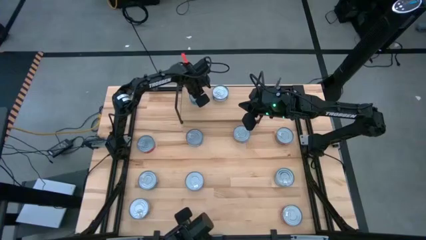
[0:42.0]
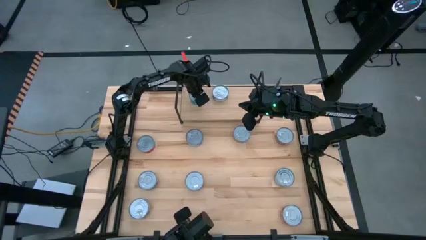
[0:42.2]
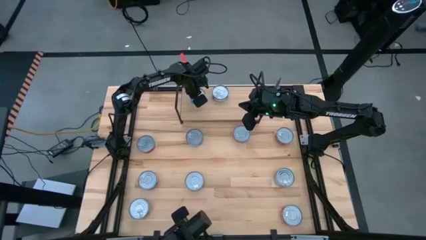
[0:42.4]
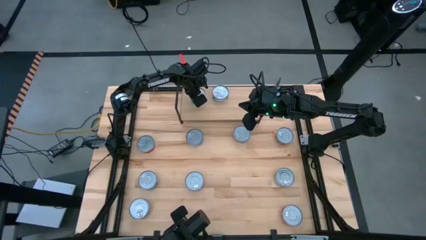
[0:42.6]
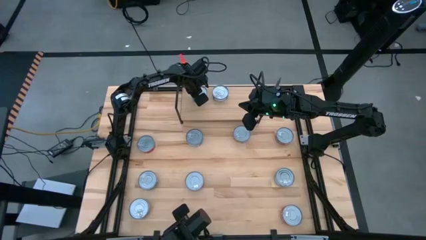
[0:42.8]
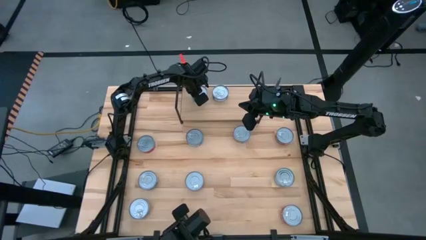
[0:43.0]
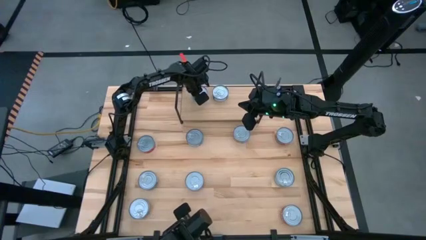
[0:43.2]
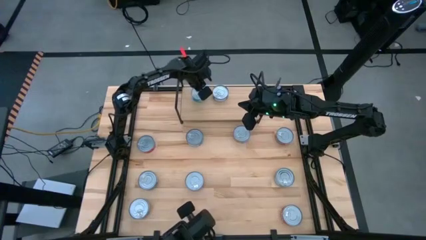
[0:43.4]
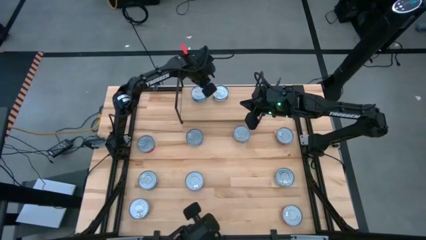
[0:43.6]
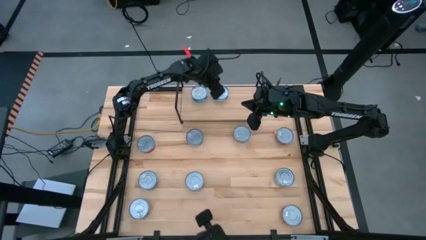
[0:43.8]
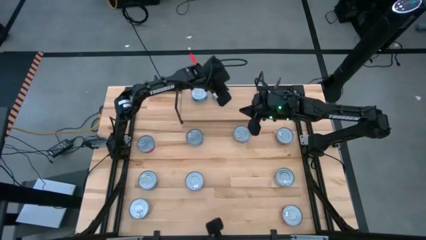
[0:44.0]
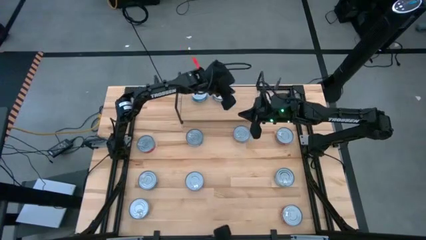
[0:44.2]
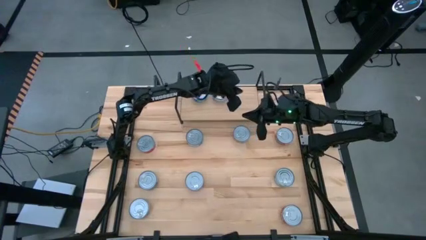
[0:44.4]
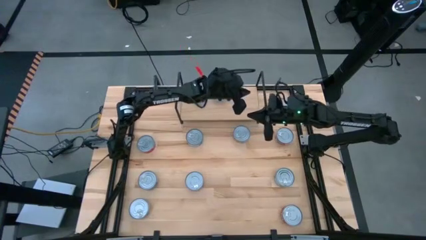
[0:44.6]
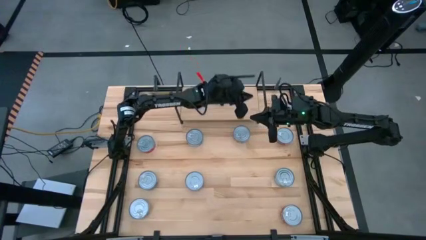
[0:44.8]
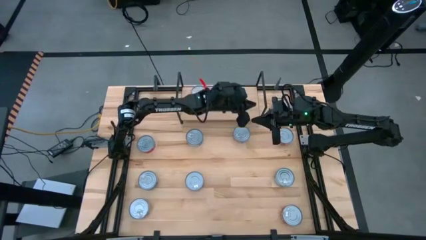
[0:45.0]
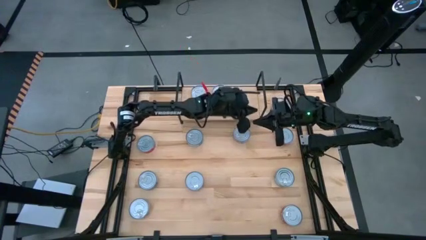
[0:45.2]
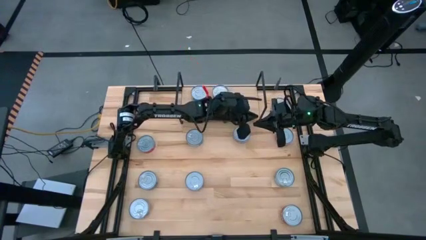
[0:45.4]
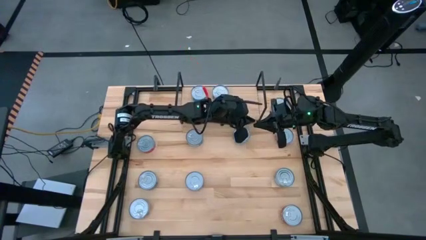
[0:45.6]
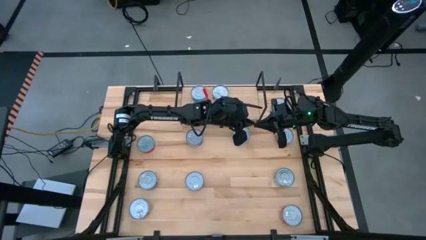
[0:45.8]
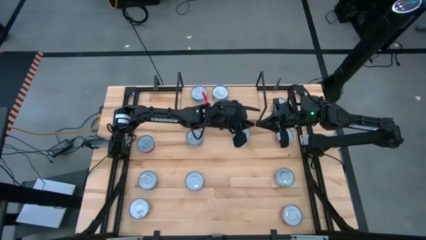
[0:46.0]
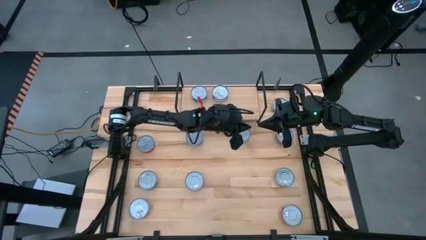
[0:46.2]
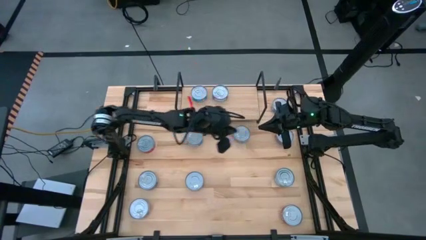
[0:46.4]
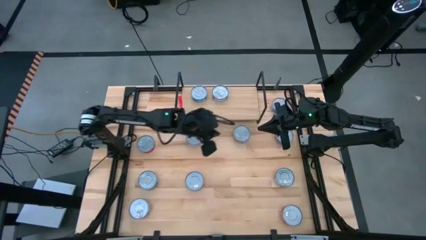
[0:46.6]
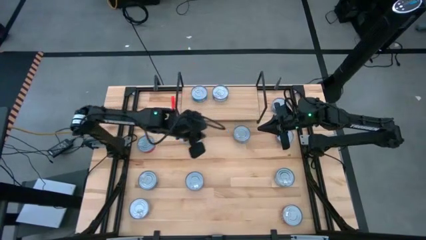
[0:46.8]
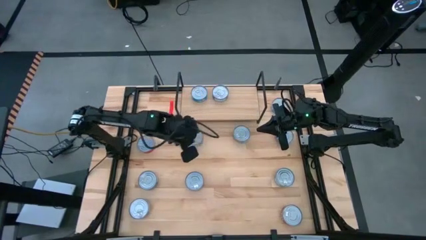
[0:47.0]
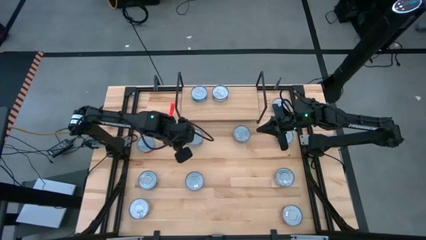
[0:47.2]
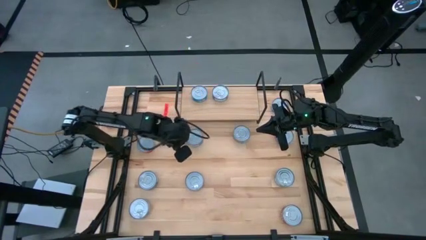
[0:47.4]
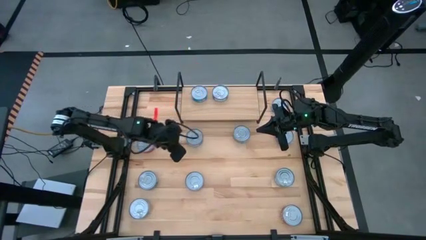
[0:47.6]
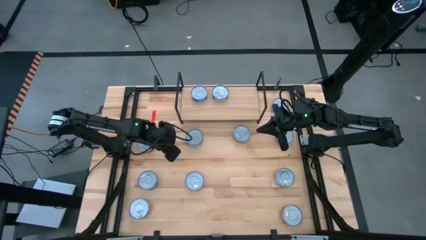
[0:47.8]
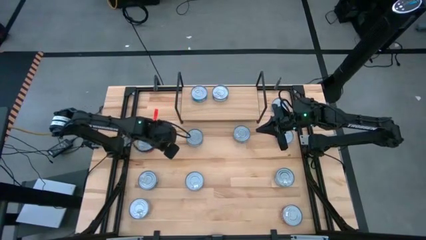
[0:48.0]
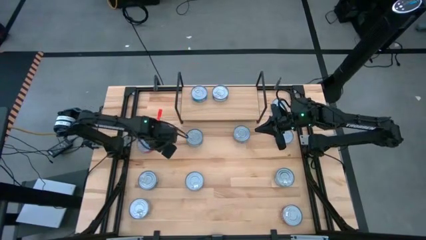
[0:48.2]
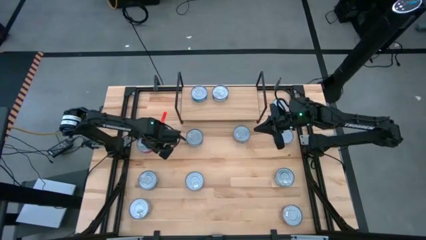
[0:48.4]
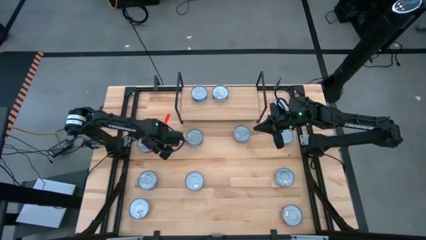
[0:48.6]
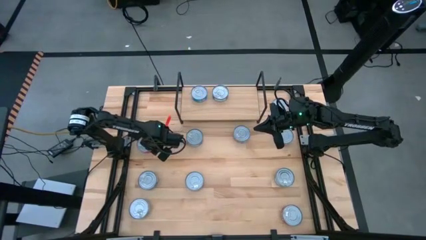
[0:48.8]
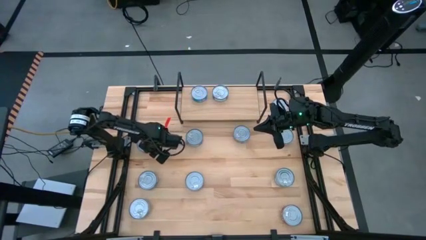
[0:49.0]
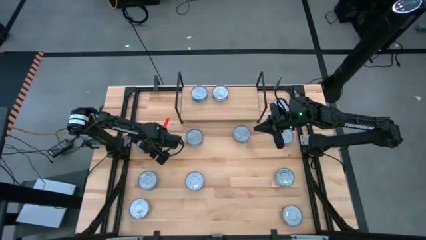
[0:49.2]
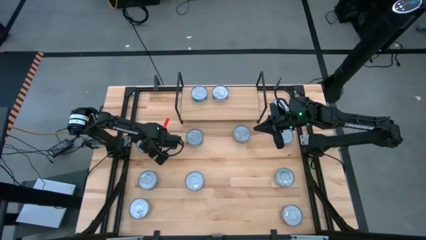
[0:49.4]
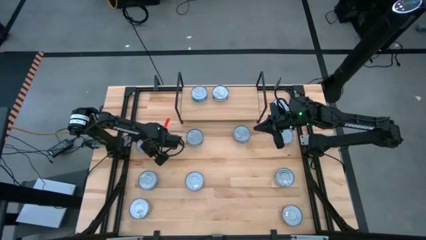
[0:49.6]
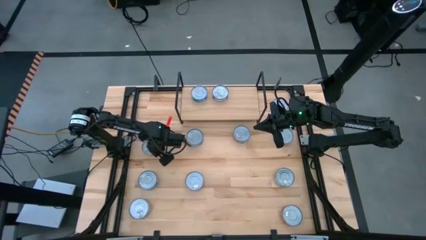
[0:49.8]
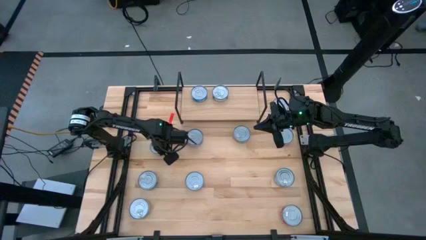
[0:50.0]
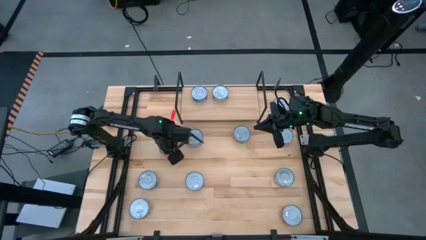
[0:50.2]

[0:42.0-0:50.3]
Task: Stack canned seafood by type on shelf
Put the red tuna can on the shelf

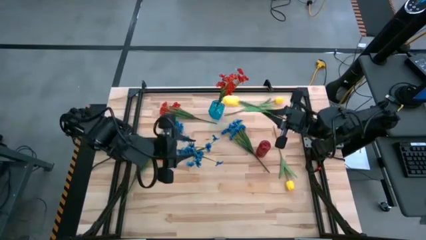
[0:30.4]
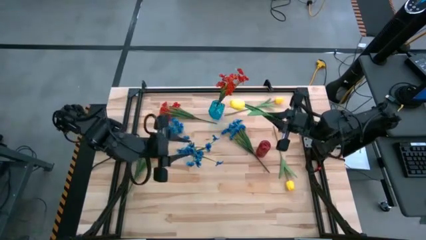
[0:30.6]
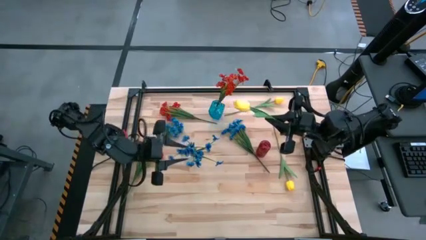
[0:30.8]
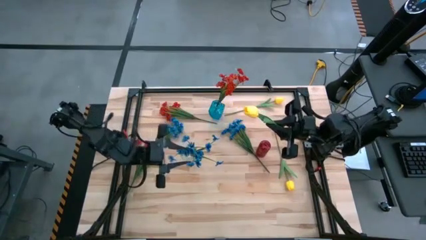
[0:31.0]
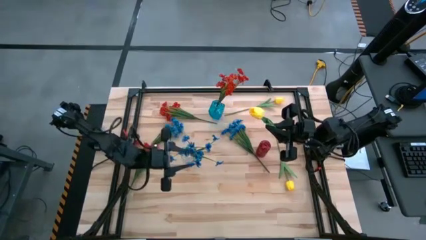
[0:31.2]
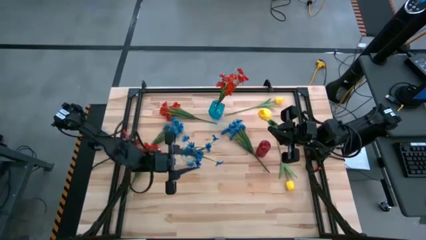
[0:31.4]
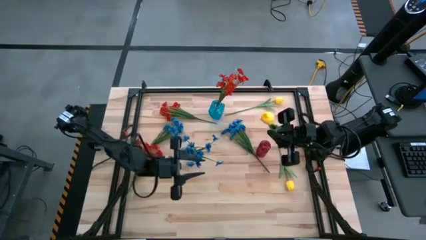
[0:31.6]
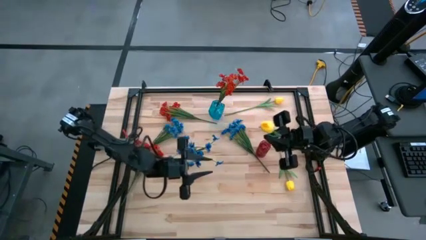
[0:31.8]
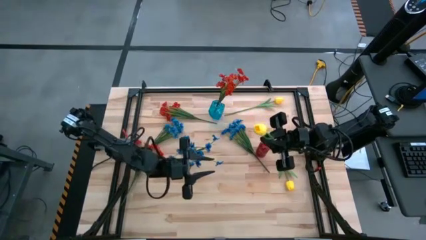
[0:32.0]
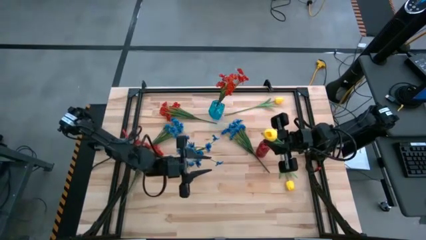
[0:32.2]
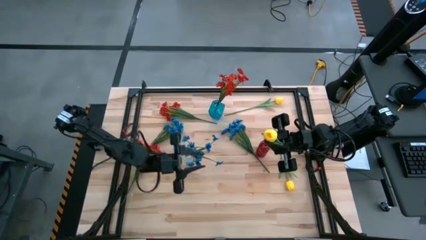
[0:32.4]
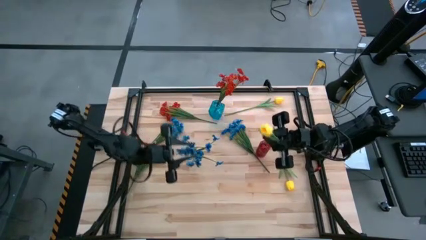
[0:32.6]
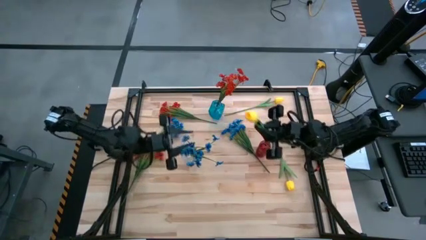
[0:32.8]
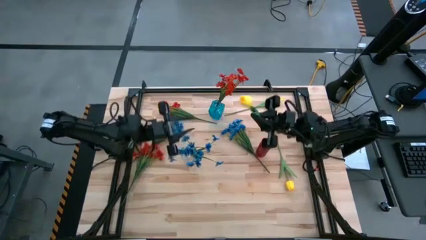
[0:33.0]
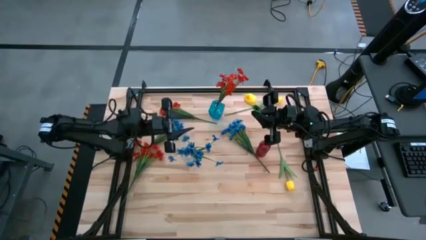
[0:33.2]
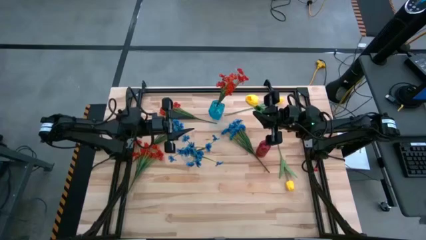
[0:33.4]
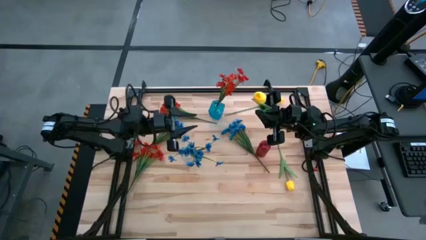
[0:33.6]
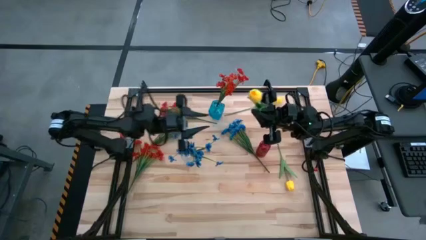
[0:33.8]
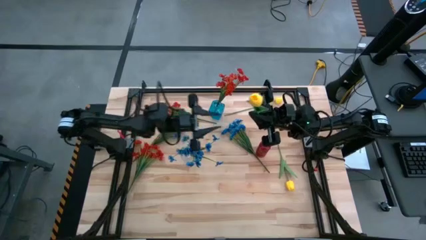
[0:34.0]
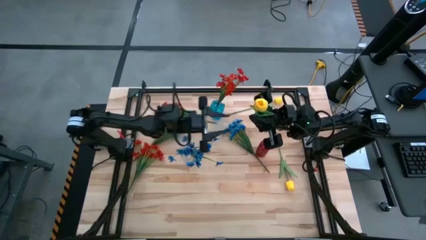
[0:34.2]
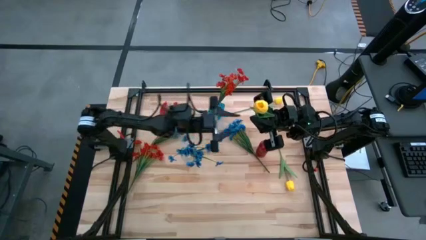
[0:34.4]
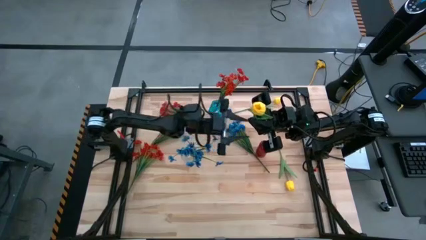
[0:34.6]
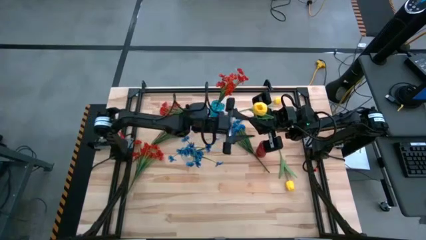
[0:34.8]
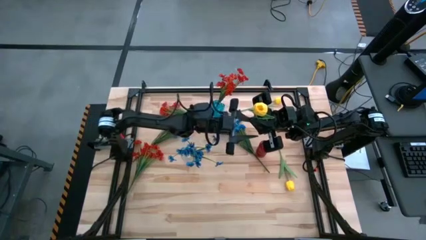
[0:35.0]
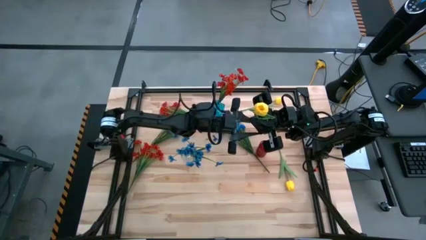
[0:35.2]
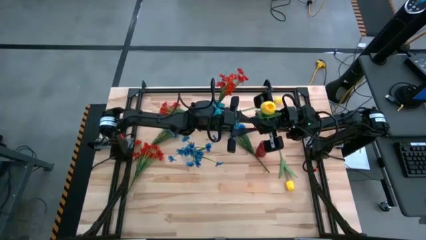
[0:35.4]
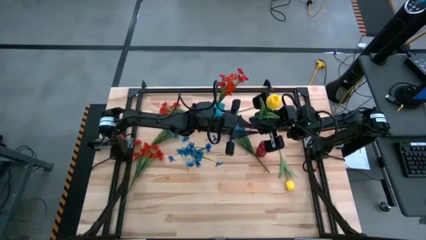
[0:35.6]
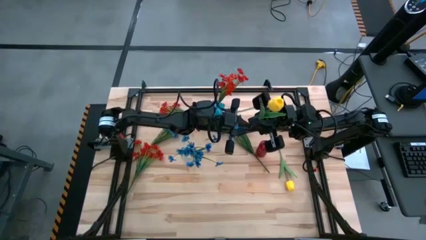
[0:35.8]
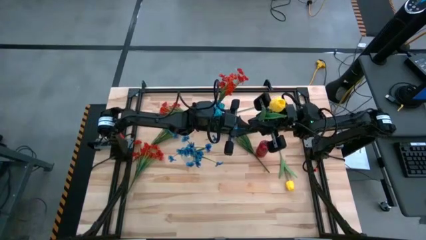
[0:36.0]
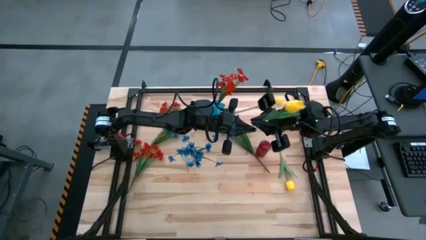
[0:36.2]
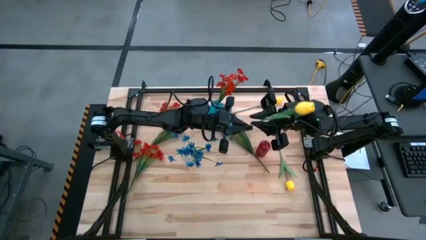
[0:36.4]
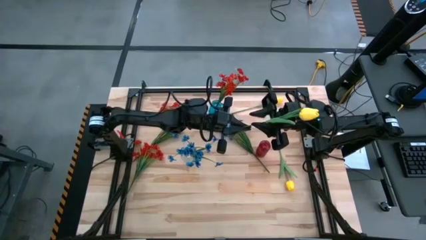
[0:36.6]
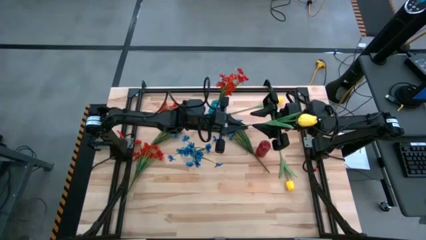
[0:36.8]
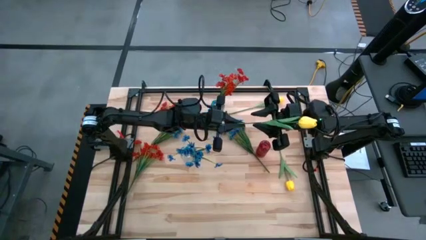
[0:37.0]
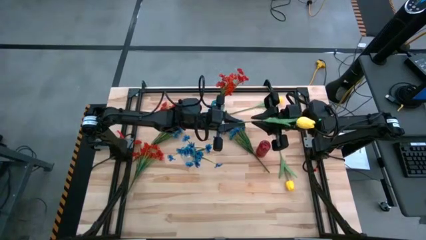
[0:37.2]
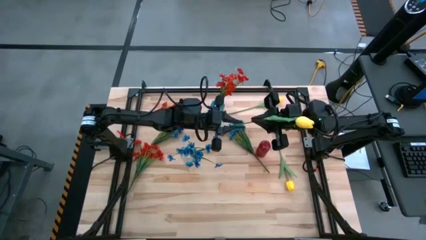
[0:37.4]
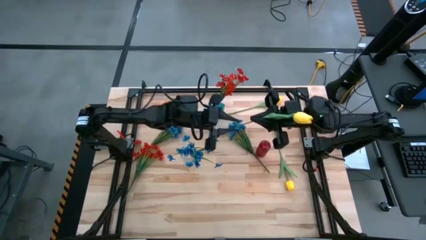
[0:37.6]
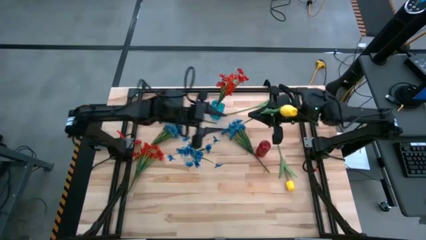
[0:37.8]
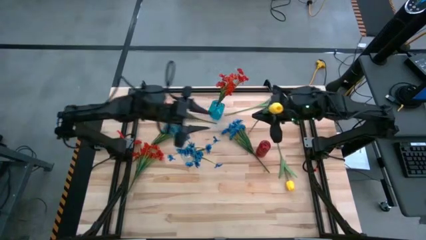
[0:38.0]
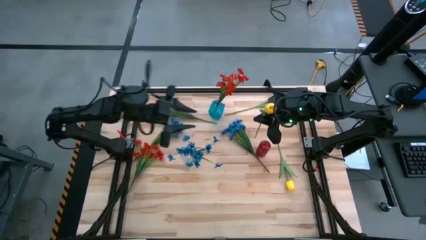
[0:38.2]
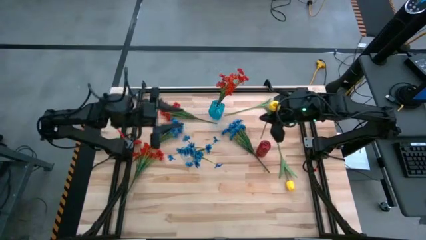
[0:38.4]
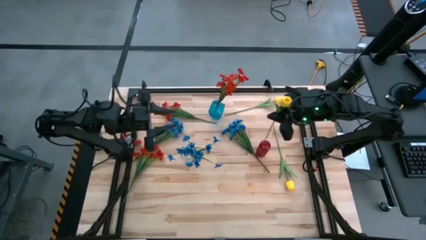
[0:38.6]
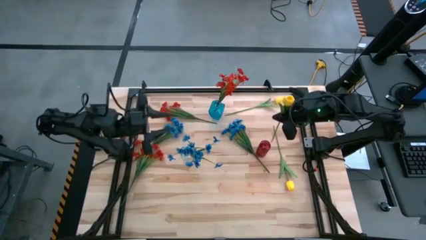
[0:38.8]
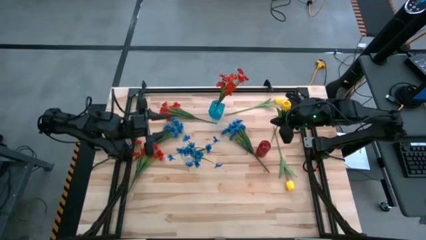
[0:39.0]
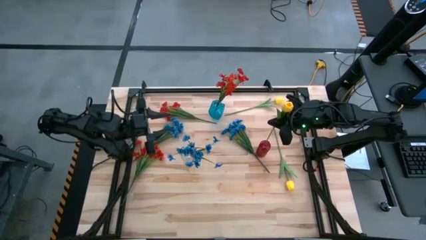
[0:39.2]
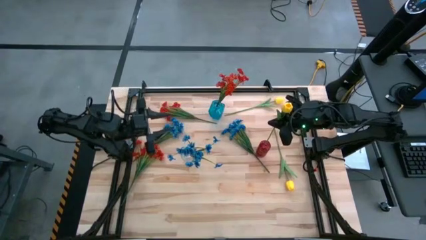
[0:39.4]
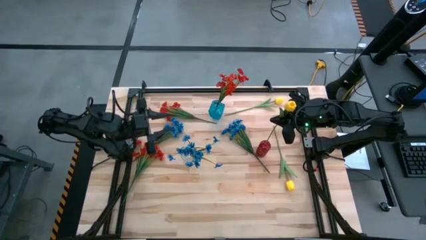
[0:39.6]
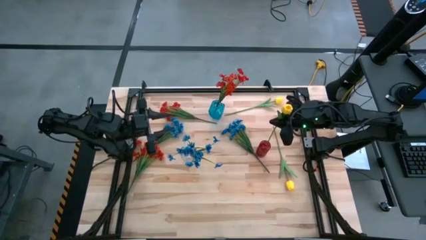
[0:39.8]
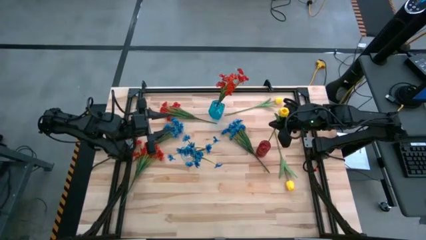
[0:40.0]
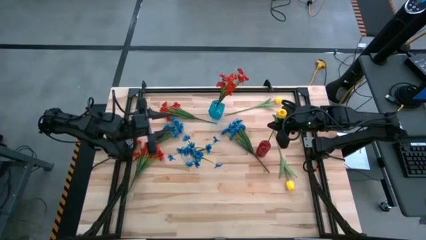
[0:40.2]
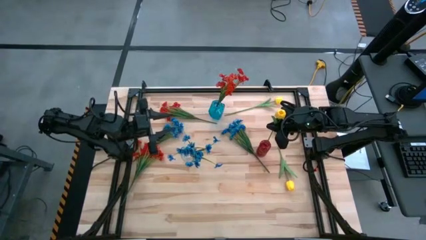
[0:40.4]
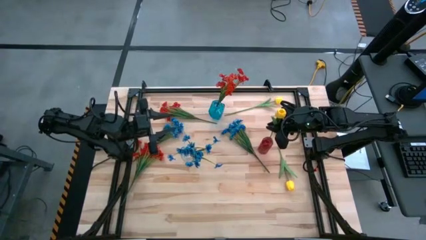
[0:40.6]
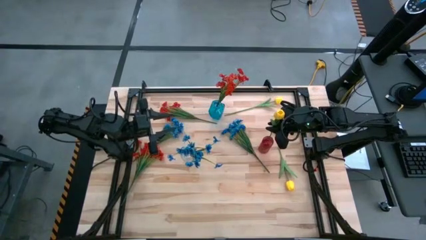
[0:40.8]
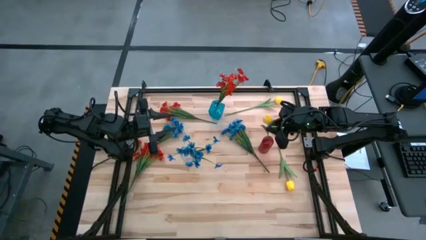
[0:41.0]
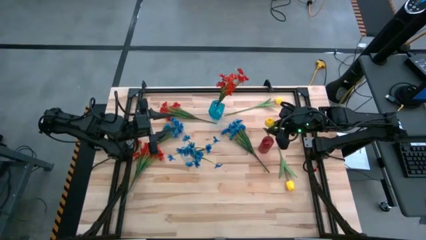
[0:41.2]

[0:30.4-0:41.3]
Task: Sort flowers into vase by color
Put the middle yellow flower into the red vase
